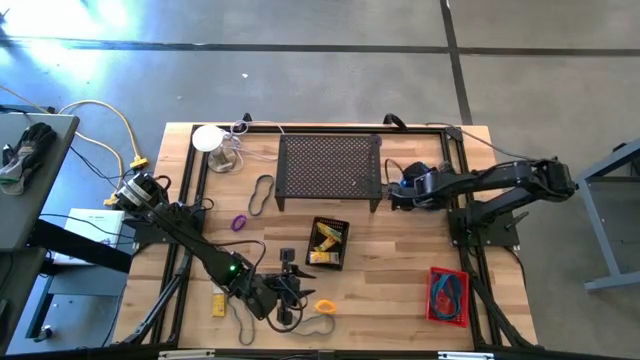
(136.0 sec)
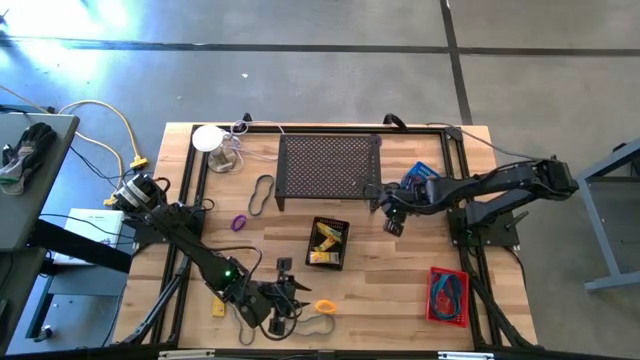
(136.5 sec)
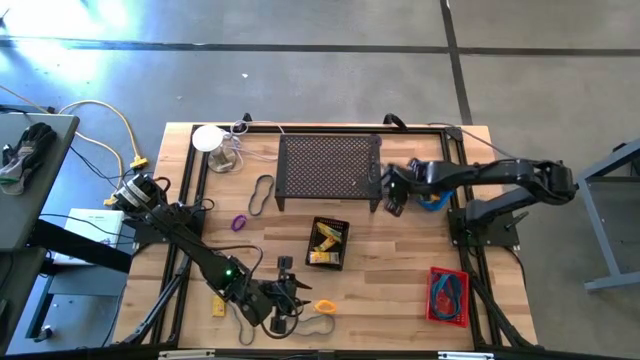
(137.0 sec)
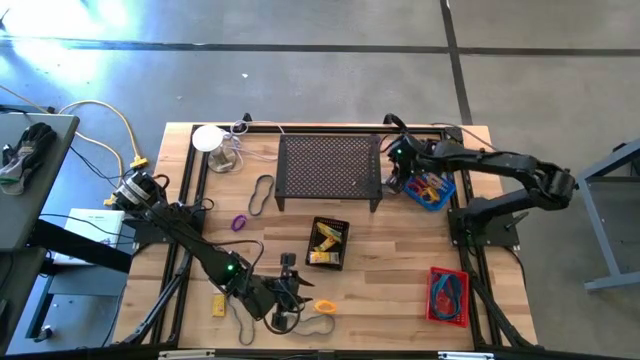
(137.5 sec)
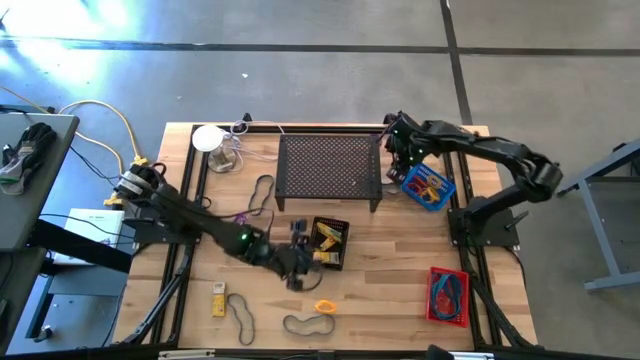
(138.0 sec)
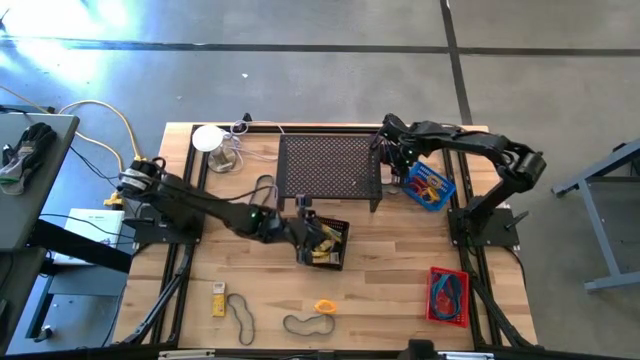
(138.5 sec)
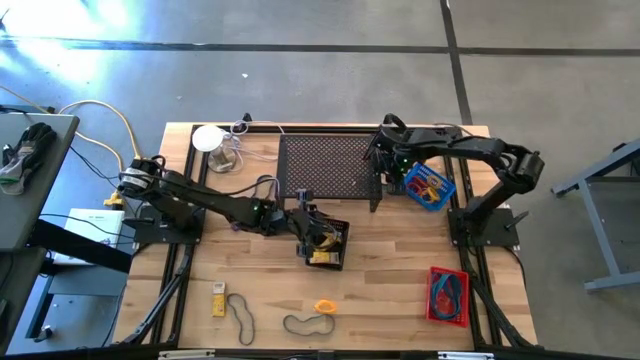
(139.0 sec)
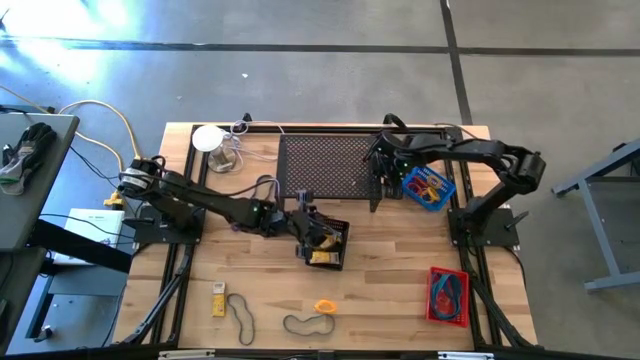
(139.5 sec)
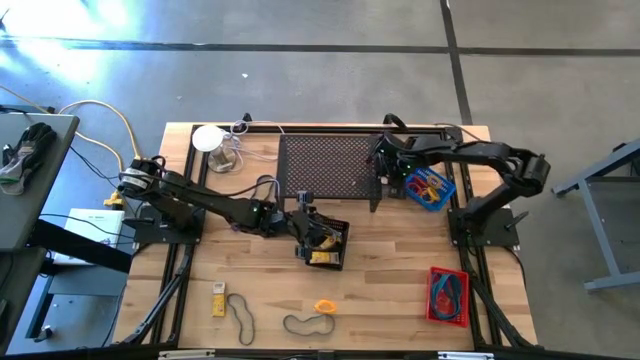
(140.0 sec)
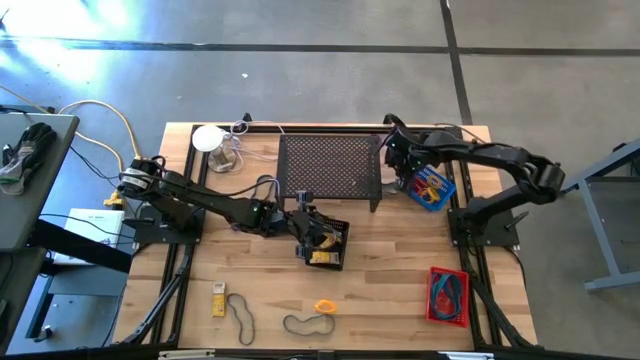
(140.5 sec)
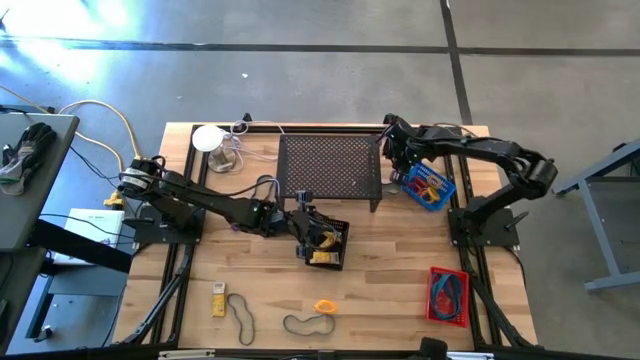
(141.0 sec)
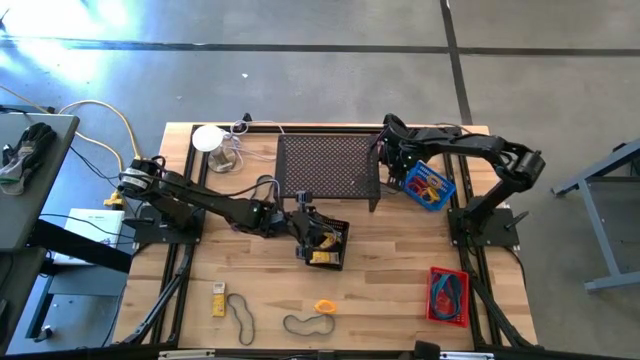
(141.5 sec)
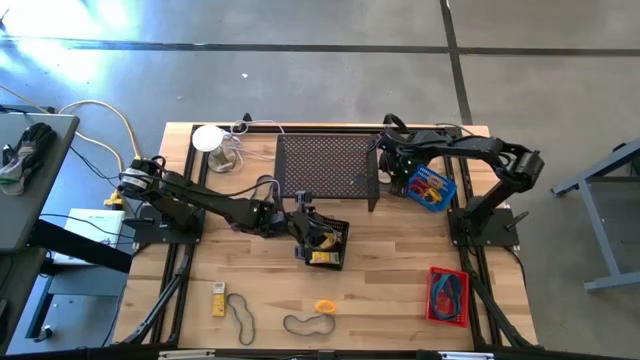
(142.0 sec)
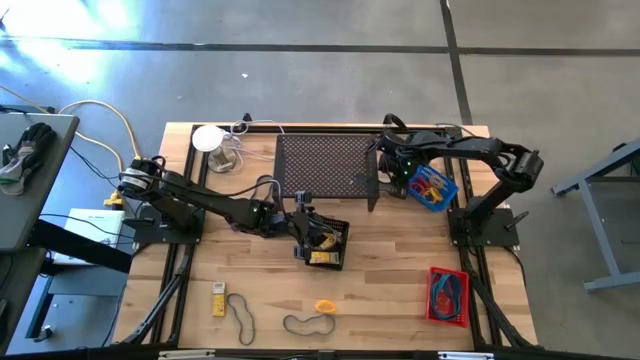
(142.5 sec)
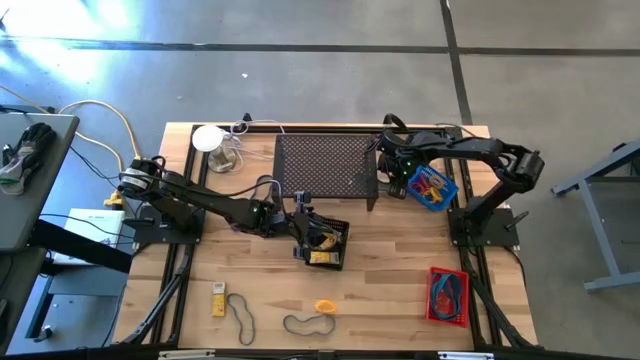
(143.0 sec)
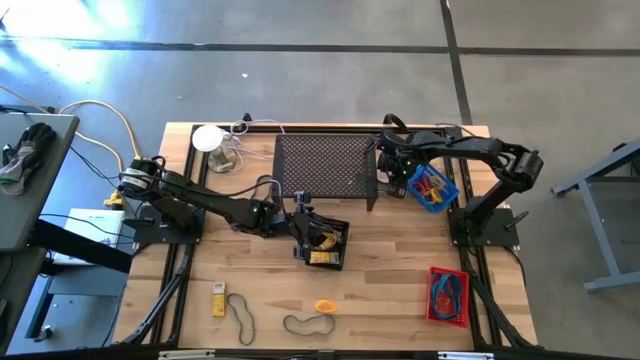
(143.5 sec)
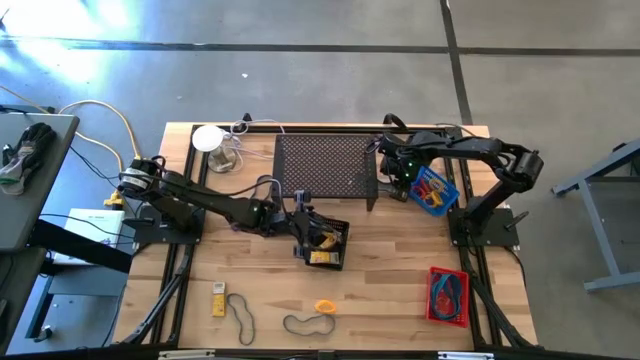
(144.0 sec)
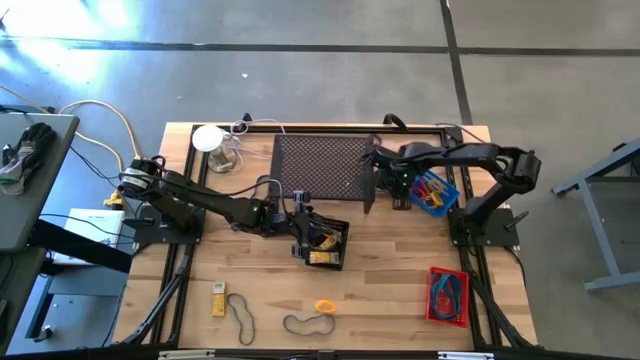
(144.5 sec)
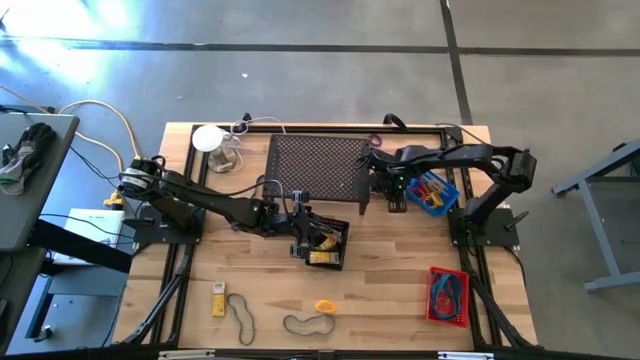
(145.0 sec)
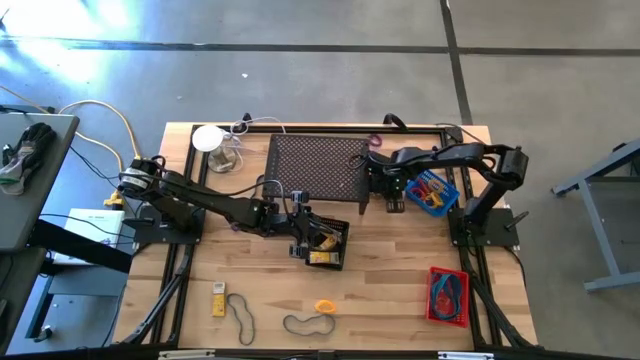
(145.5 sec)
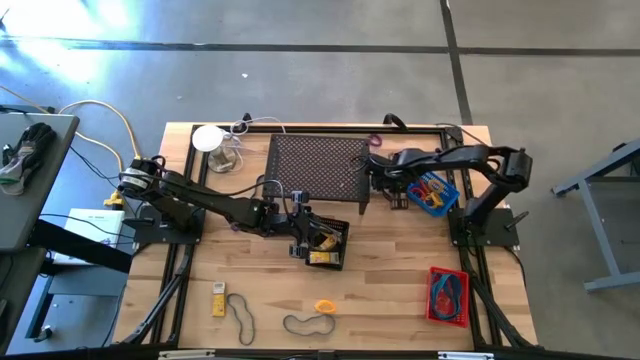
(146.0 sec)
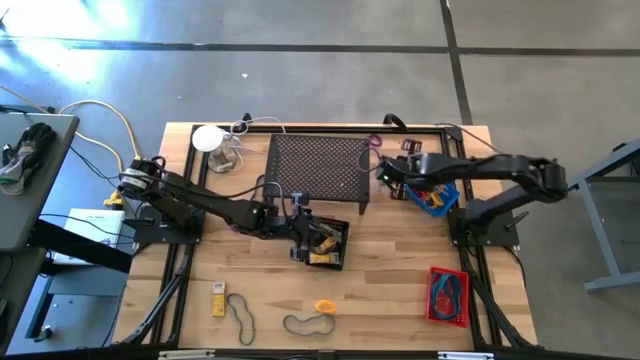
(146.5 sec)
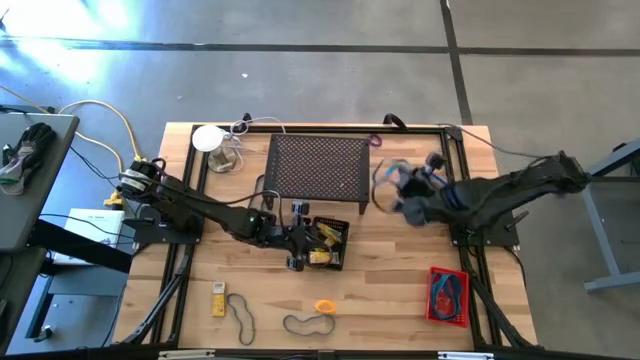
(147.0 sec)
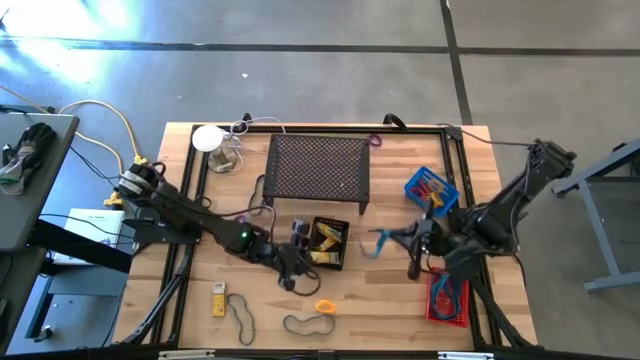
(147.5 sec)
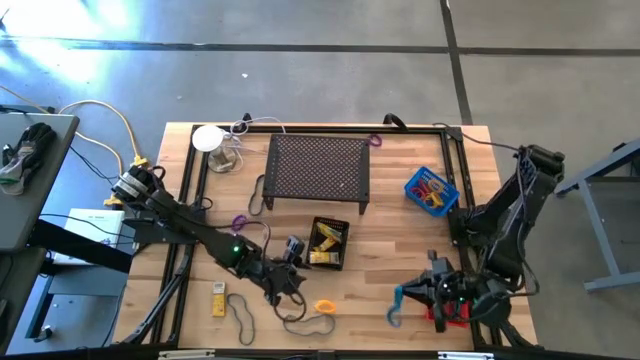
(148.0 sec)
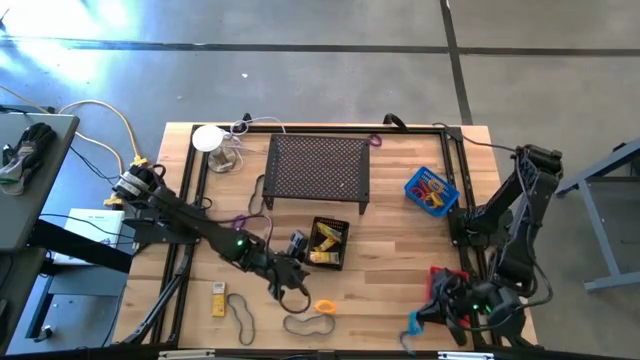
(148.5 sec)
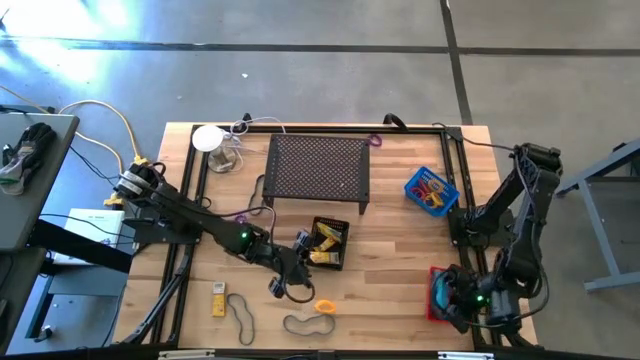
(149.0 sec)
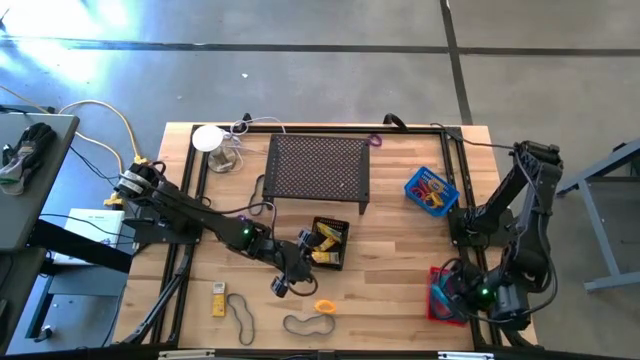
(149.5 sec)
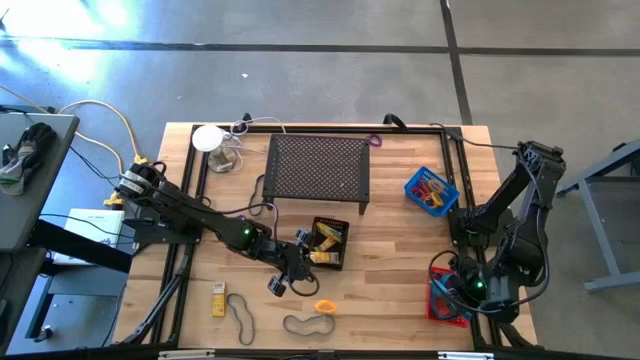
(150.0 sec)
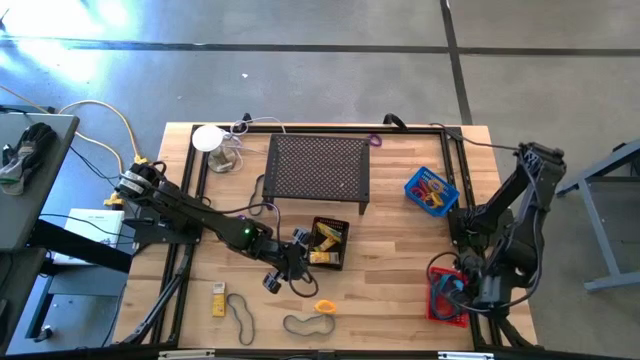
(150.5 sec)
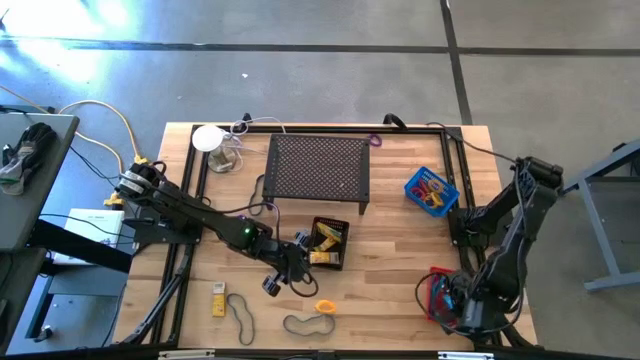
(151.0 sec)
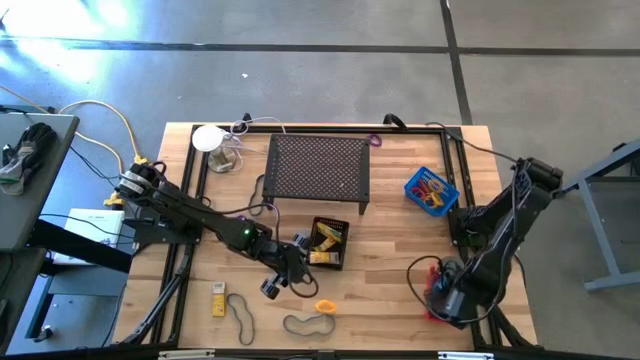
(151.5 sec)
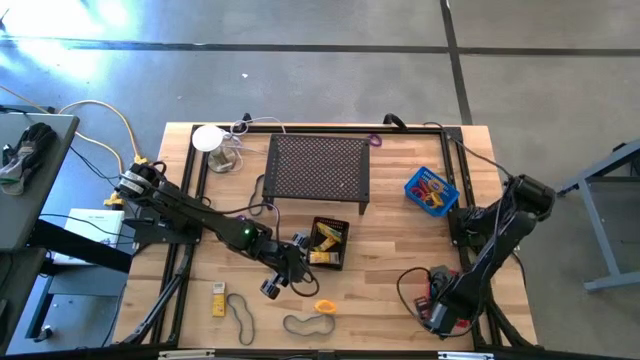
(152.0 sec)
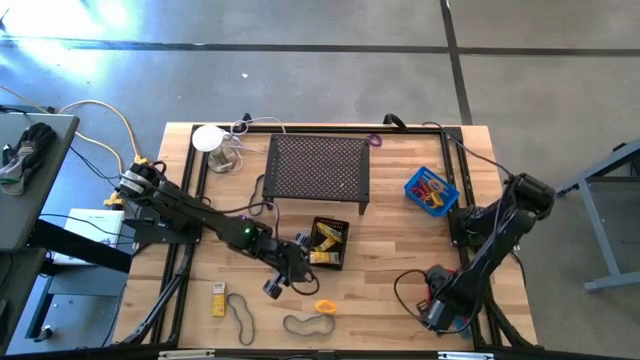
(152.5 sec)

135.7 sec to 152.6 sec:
Task: Pick & Place Office Desk Supplies
Put the blue rubber band into the orange bin

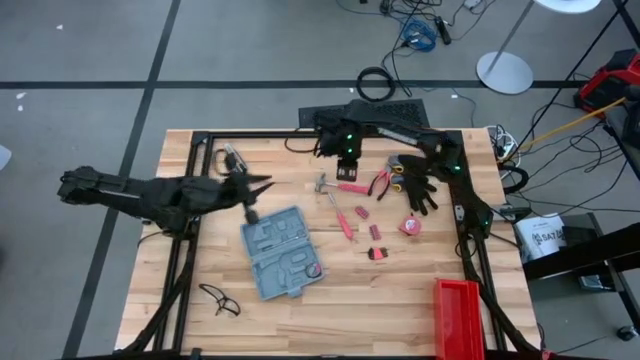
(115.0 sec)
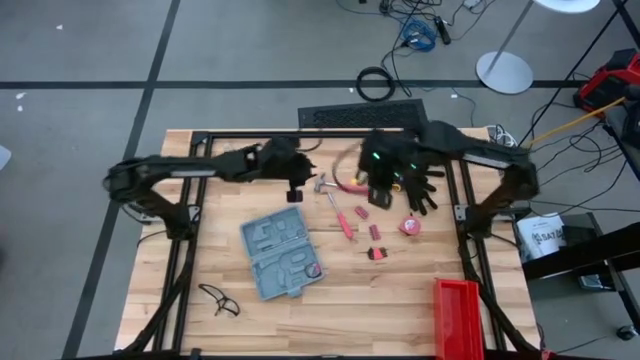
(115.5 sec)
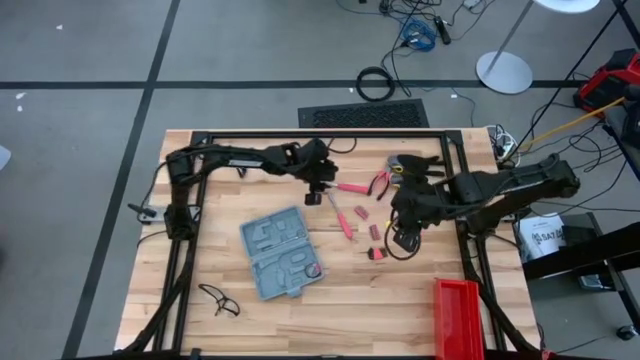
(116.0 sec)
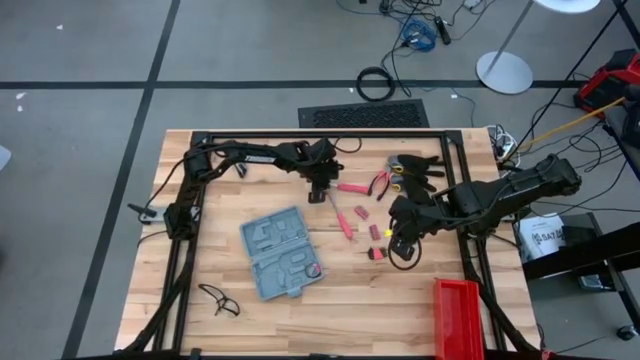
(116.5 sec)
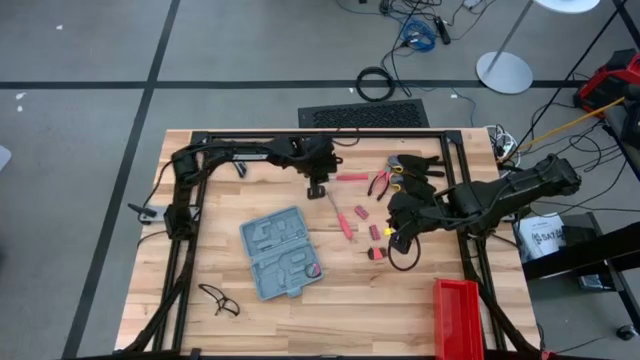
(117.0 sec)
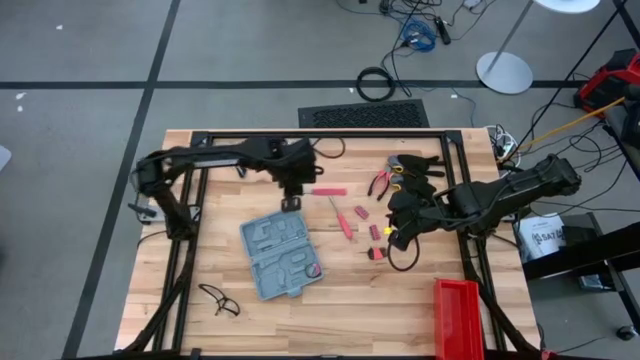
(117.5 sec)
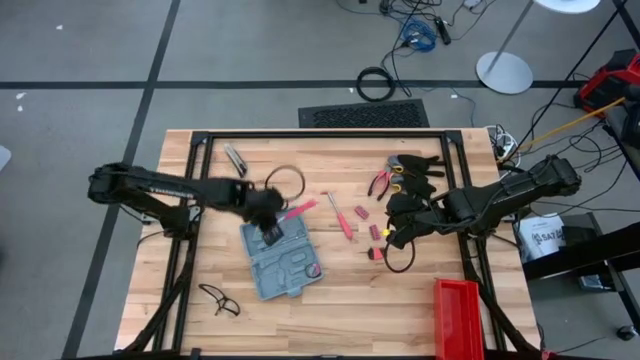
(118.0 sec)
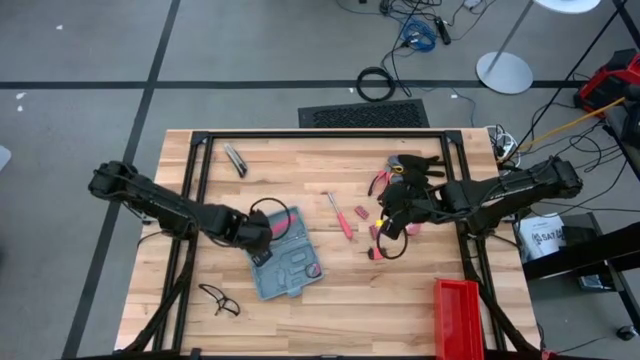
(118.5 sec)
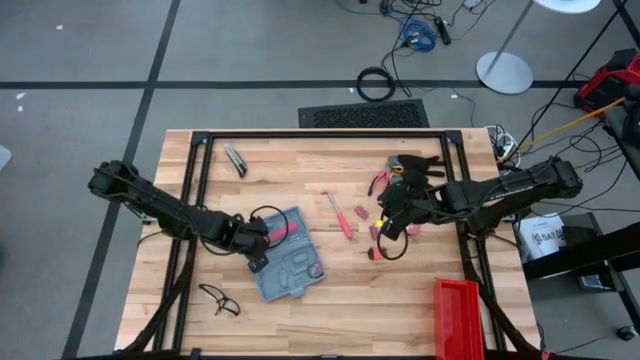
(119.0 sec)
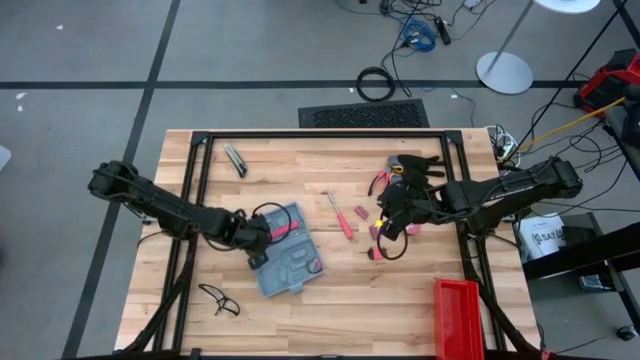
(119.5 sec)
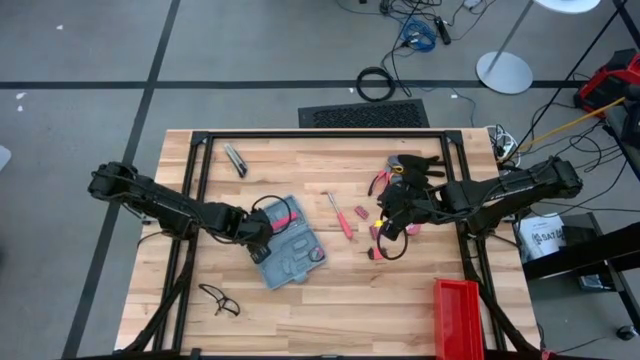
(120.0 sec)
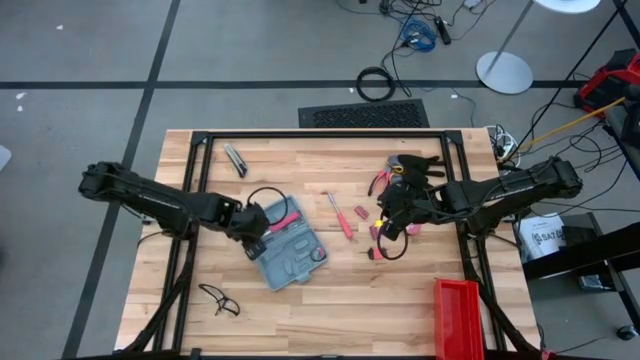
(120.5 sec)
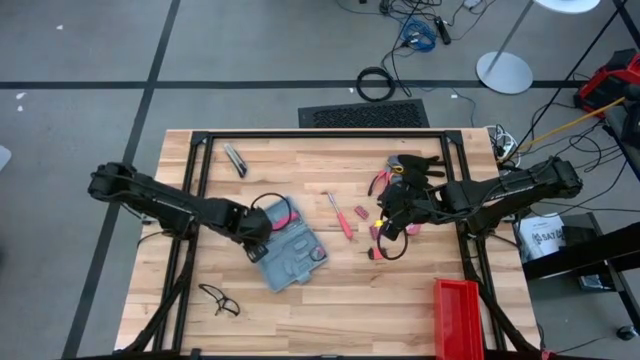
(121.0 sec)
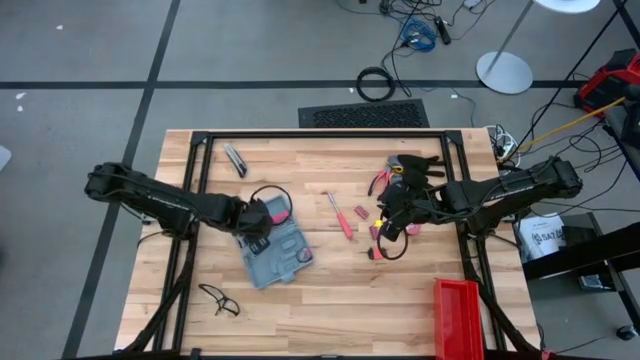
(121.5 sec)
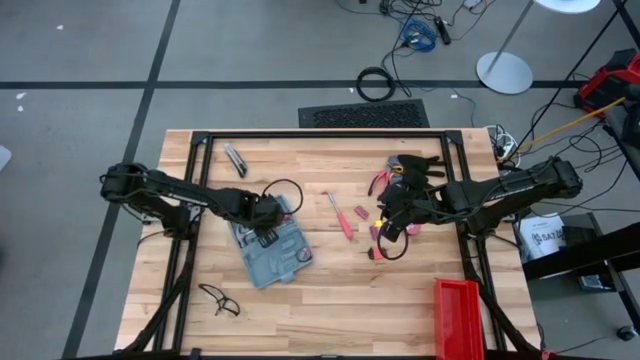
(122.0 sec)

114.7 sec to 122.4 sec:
Task: prefit tool cases
Put the pink hammer into the gray prefit tool case
